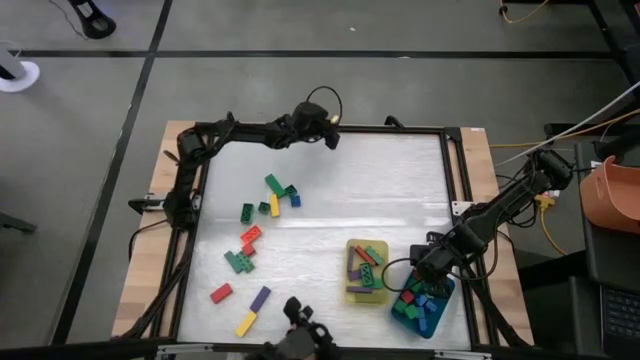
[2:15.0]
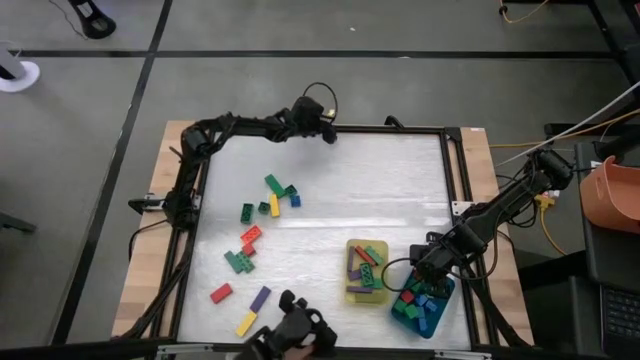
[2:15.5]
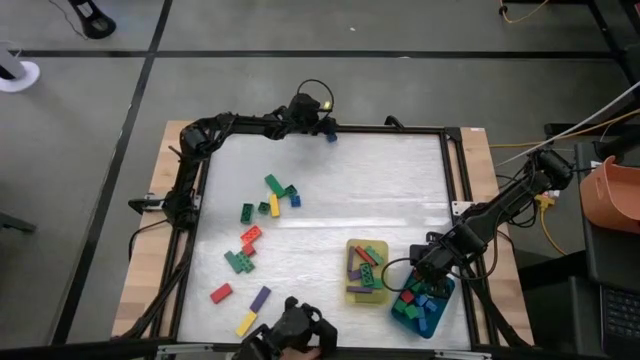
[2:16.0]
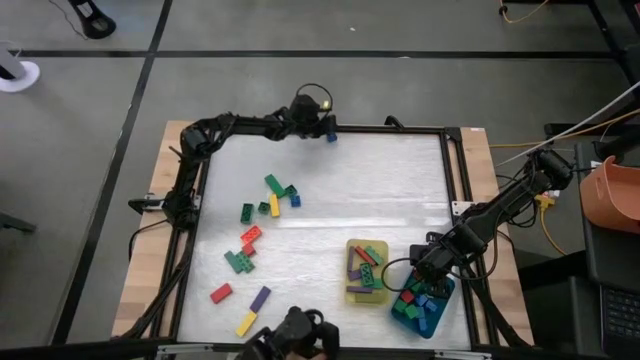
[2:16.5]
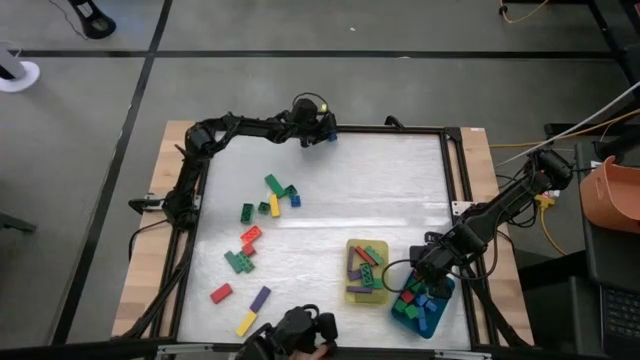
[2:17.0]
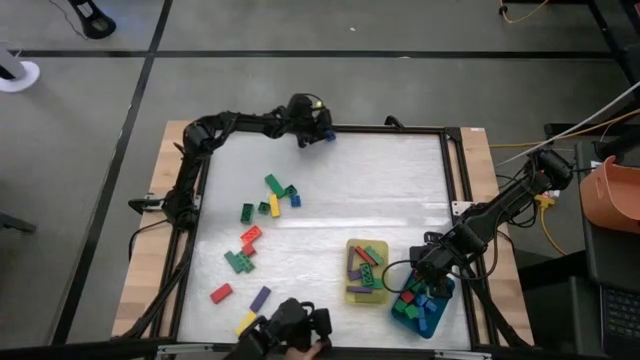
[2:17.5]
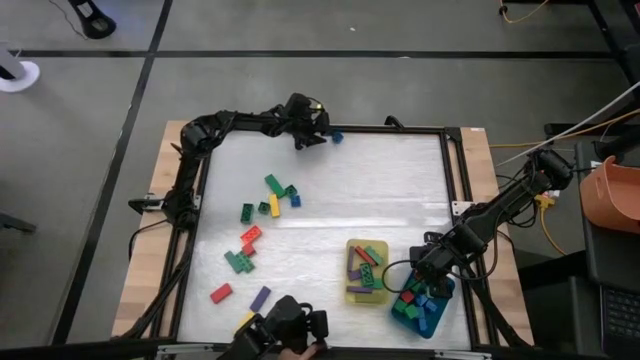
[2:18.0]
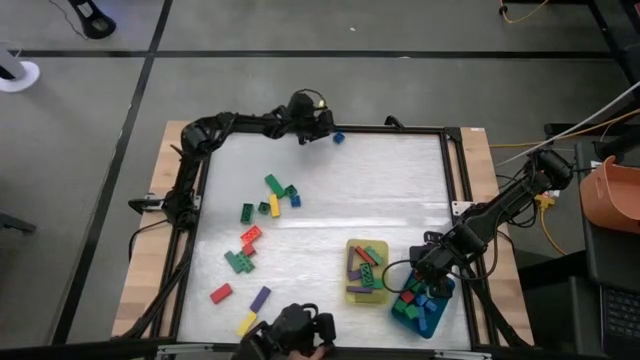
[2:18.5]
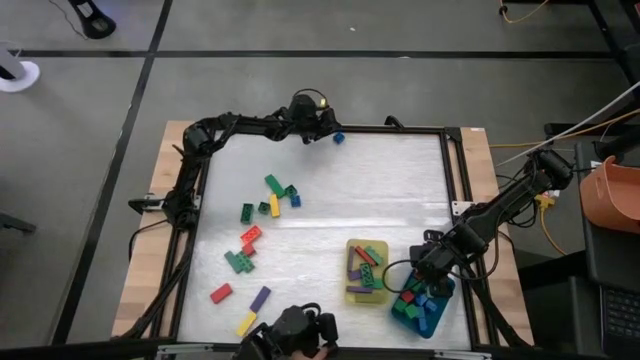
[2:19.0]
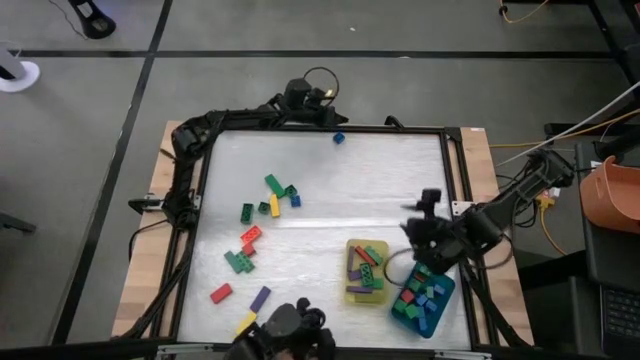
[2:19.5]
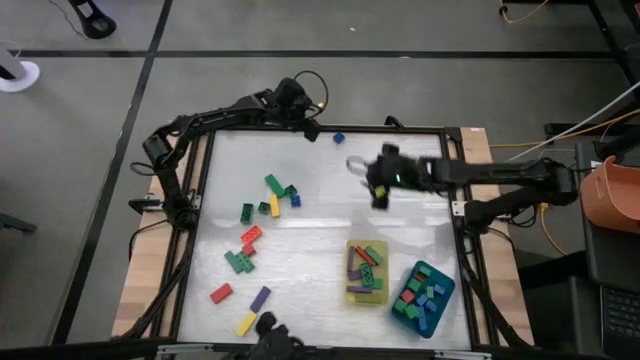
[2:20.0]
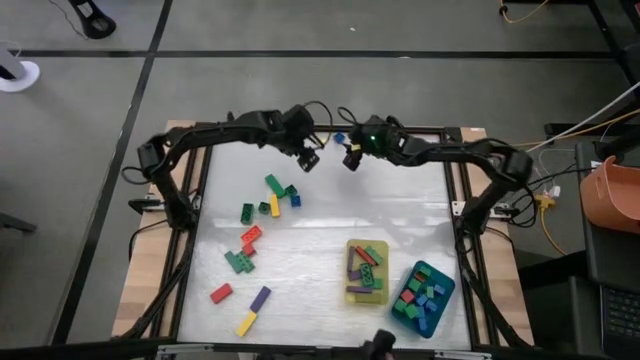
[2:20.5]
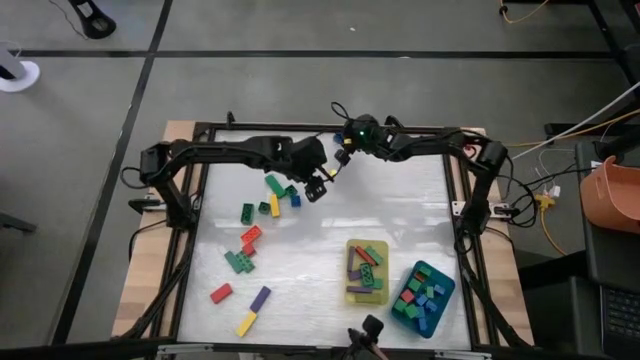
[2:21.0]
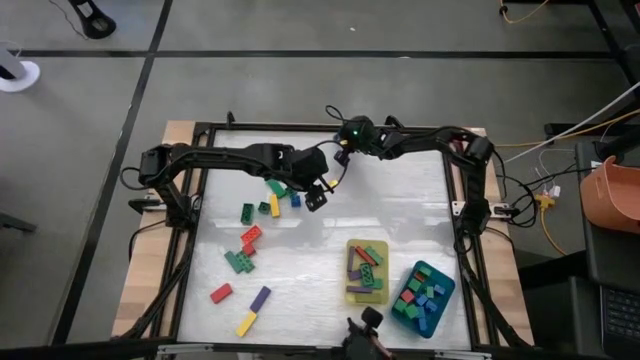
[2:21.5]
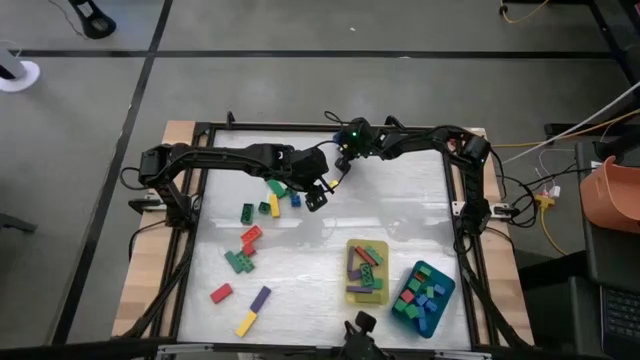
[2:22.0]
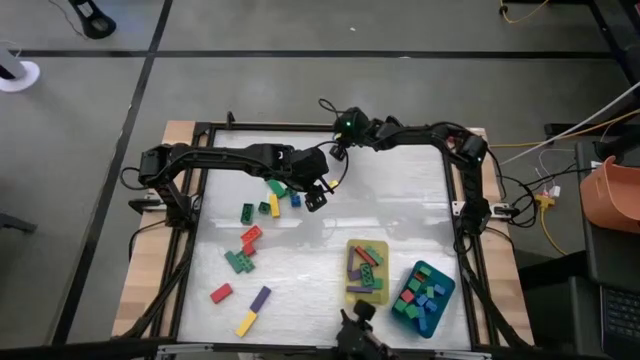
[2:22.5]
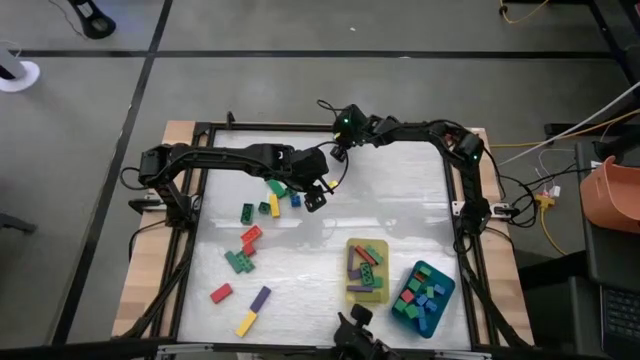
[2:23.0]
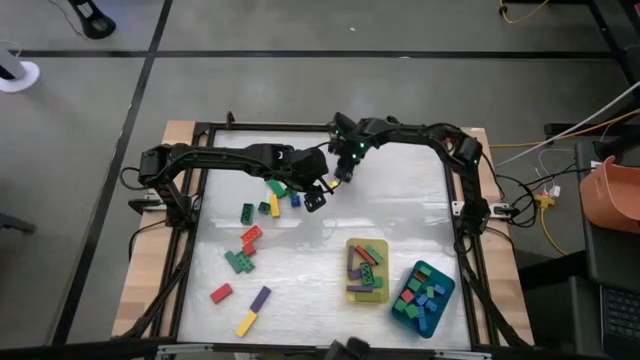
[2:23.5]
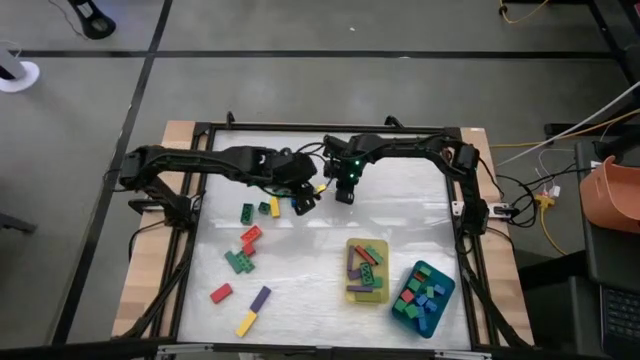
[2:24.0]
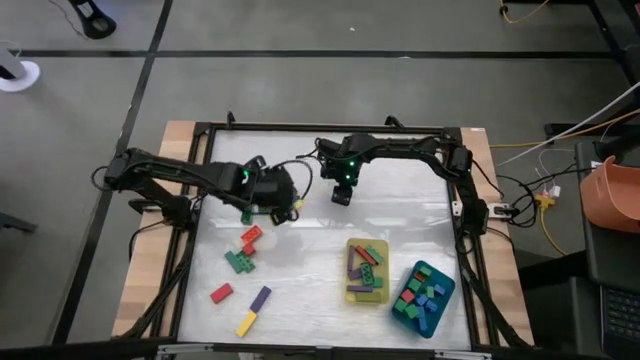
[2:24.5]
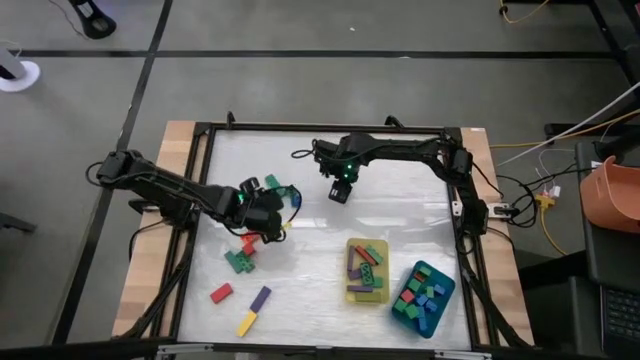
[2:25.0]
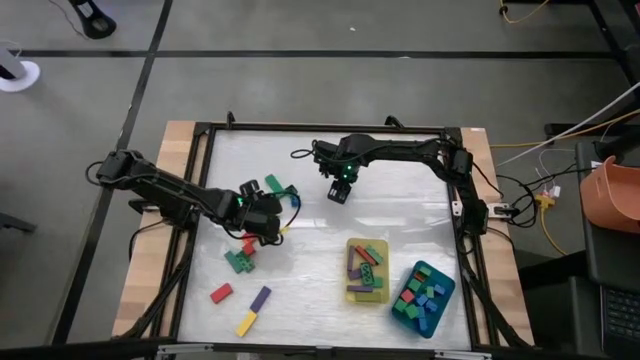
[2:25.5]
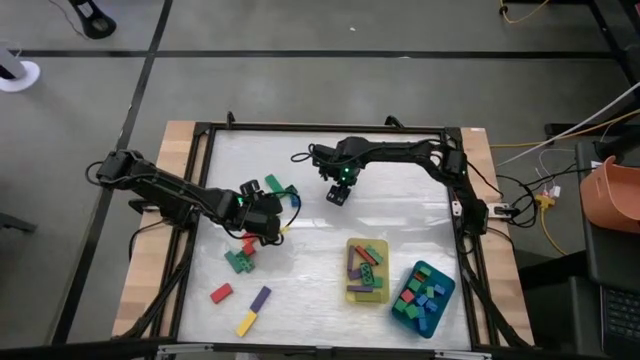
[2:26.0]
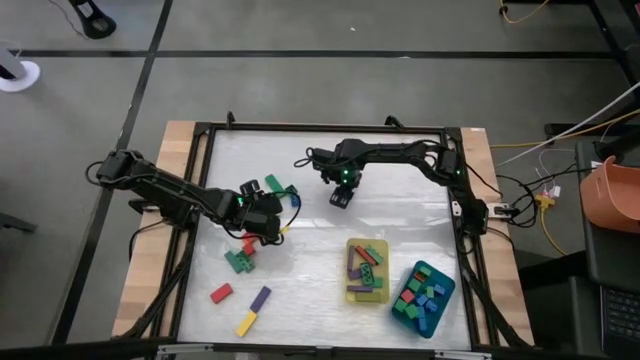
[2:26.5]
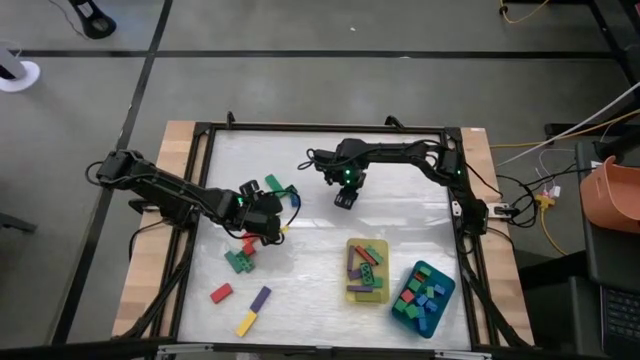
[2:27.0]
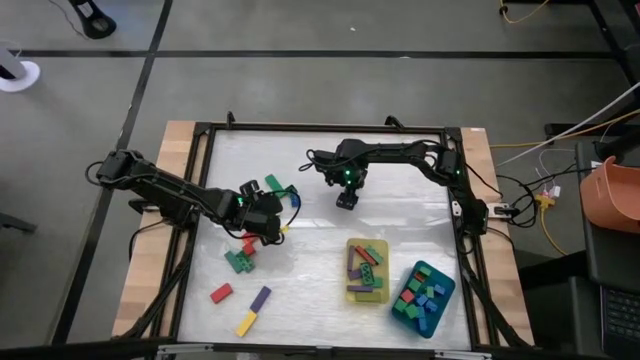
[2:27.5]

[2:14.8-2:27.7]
Task: Sort blocks by size
Put the small blue game piece into the blue bin

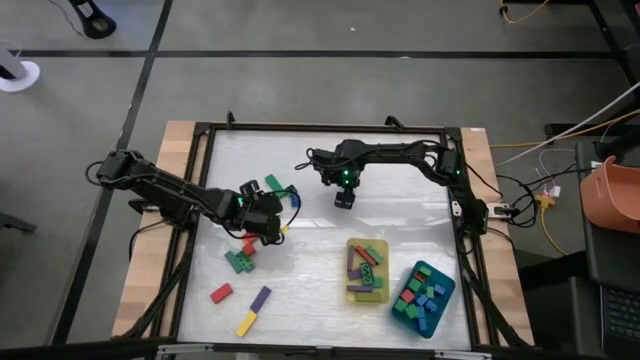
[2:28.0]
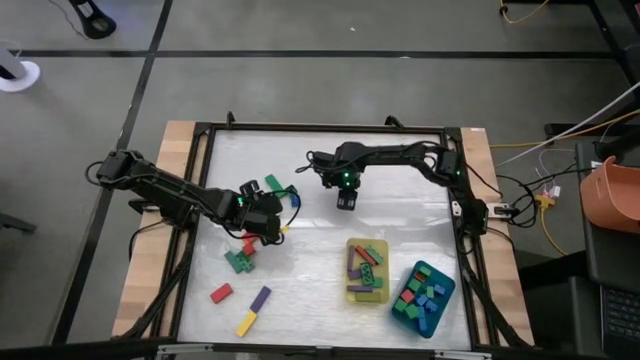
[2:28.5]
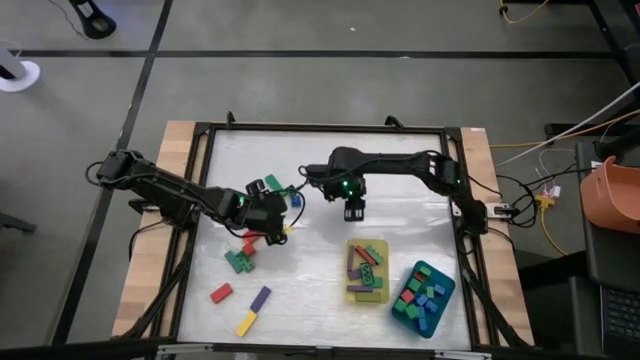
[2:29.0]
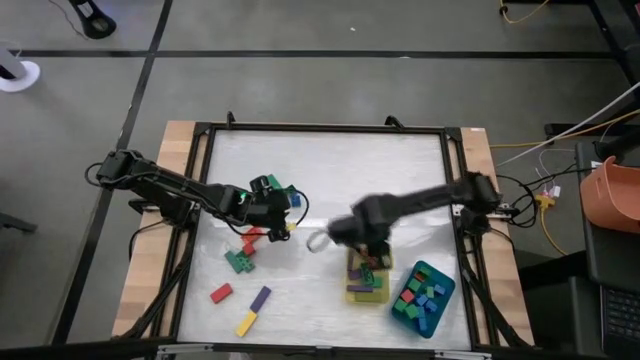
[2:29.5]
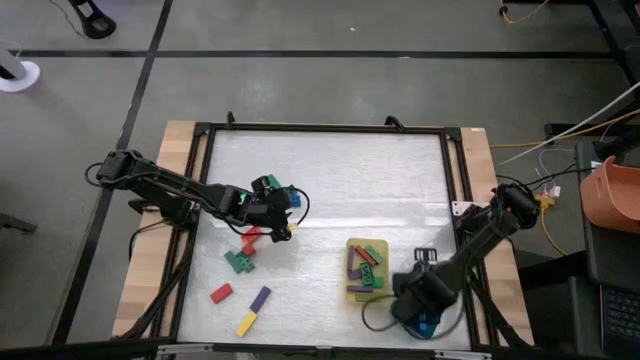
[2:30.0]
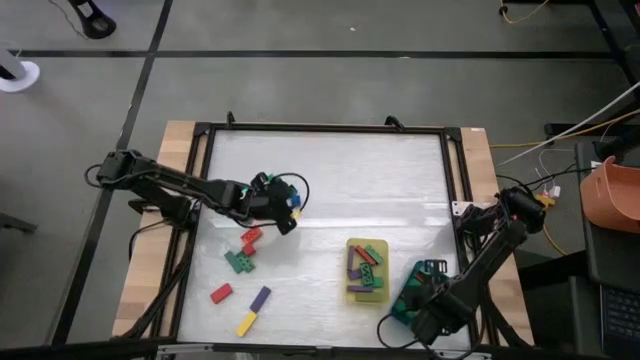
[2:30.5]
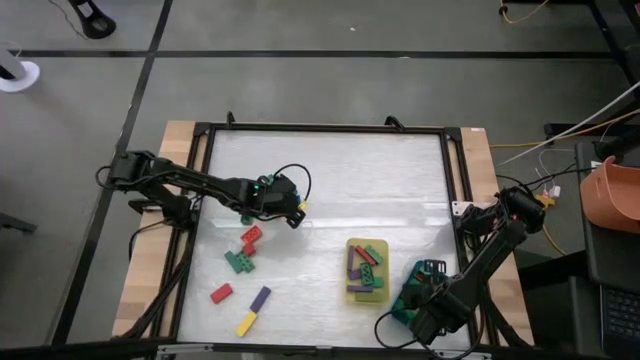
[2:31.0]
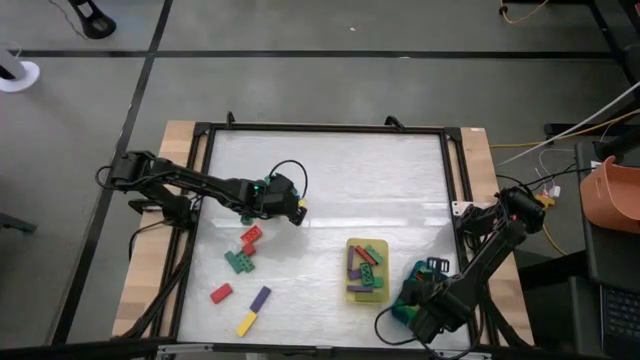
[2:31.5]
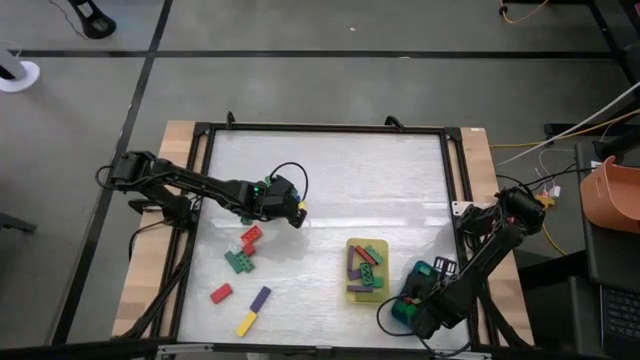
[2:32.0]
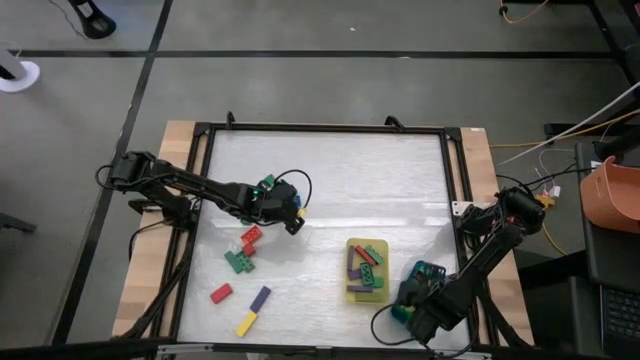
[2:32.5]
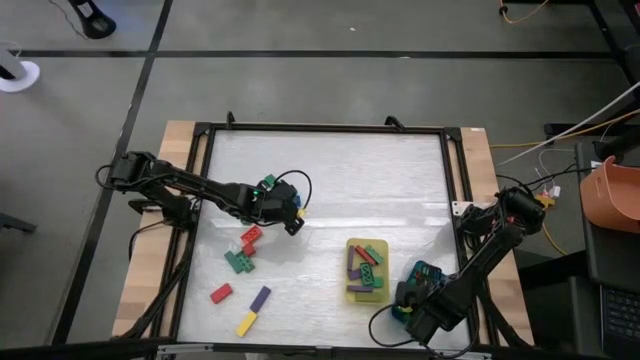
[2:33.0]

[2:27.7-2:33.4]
Put the small blue game piece into the blue bin

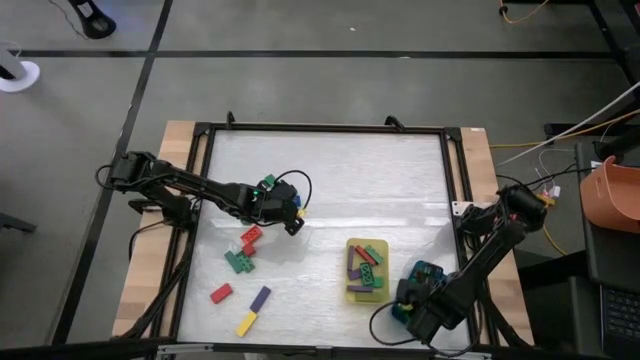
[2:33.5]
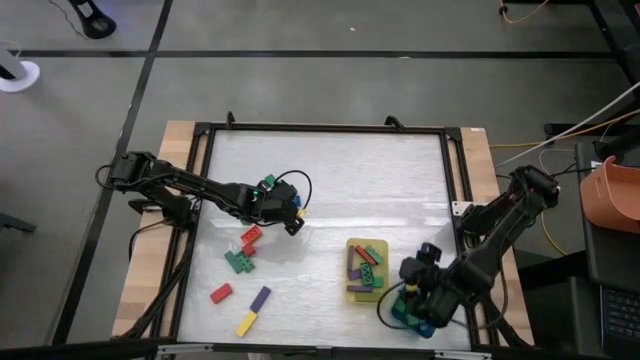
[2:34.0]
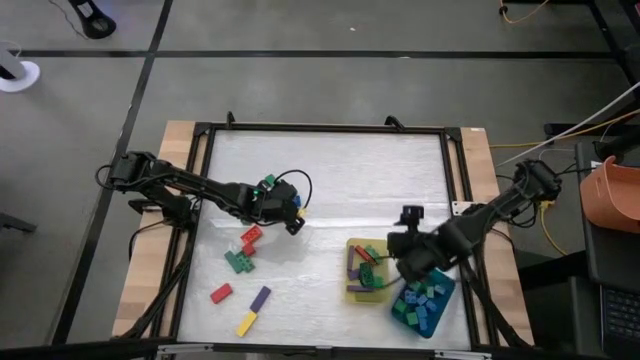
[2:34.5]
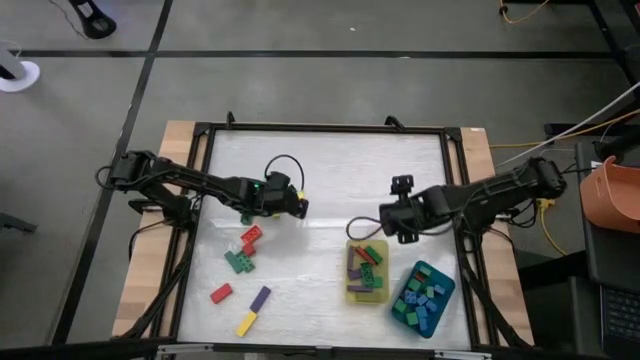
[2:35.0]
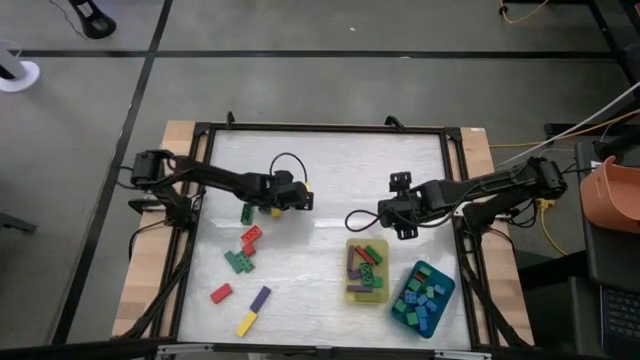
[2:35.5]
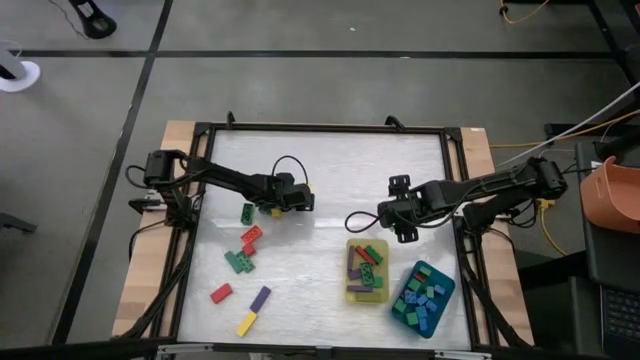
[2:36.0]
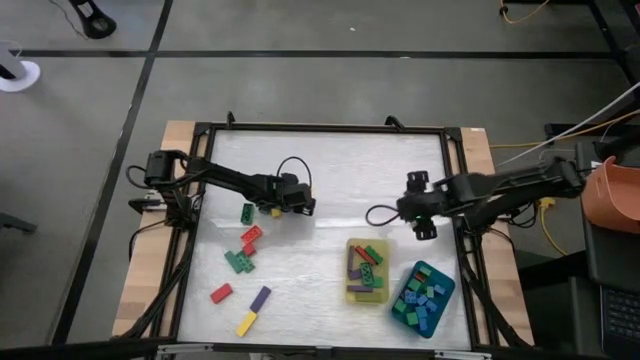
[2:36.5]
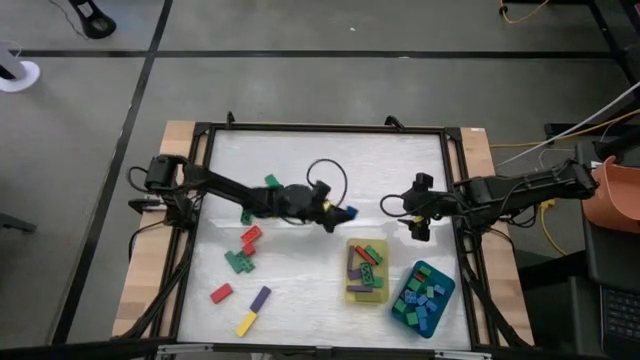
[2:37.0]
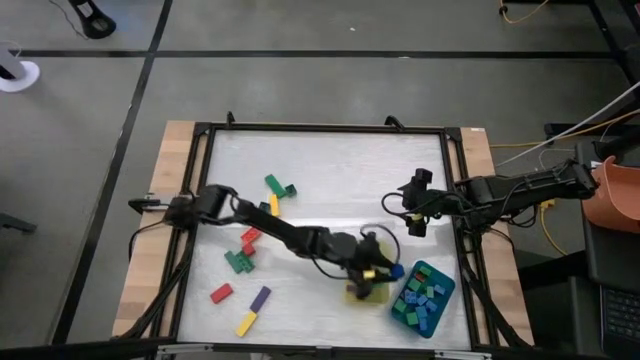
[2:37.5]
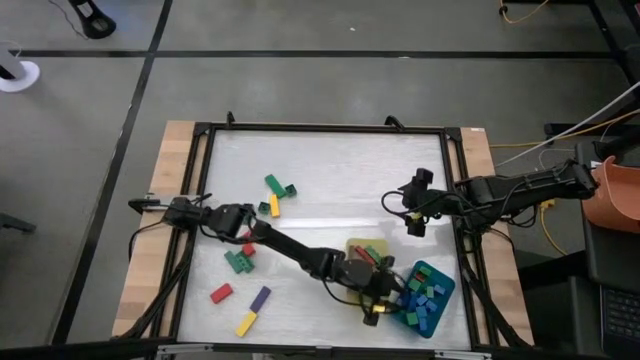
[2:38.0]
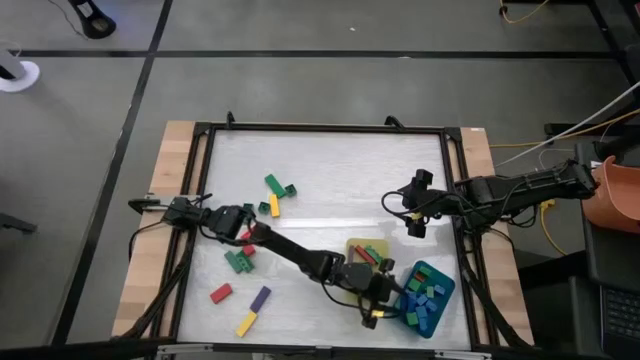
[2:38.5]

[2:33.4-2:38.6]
Put the small blue game piece into the blue bin
